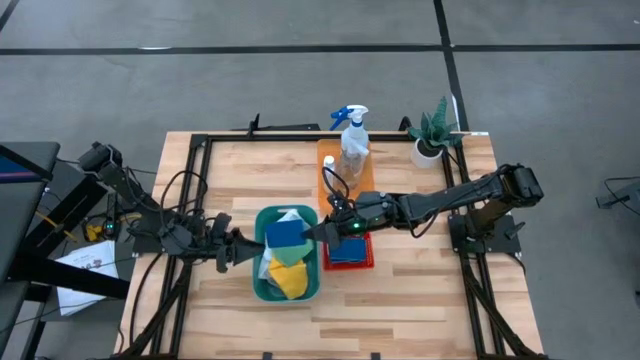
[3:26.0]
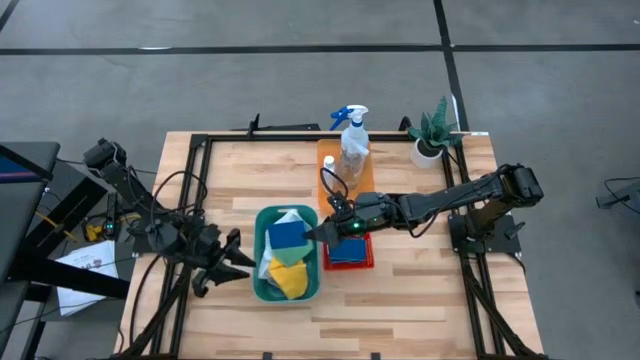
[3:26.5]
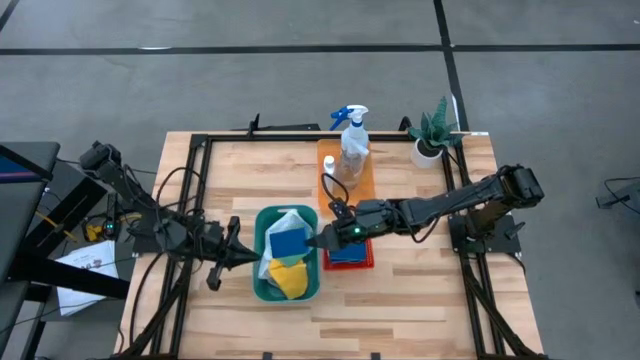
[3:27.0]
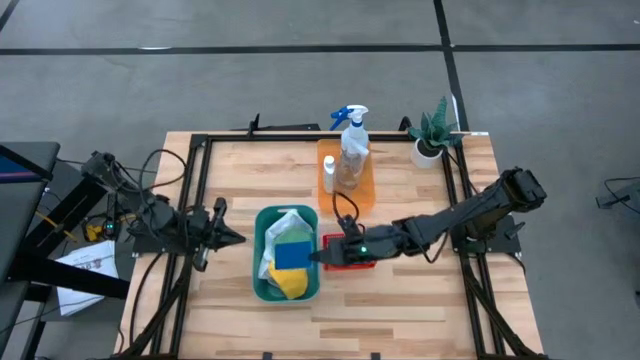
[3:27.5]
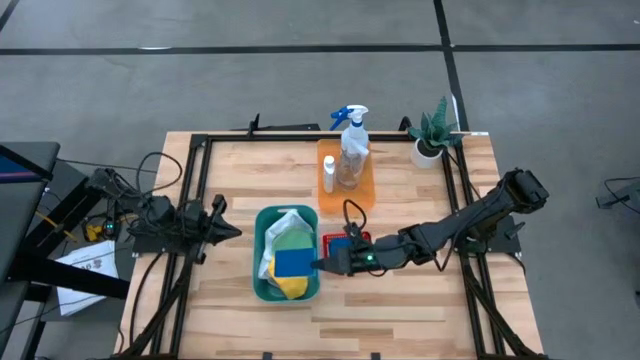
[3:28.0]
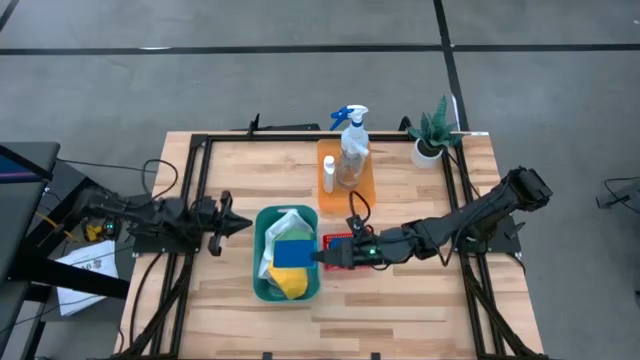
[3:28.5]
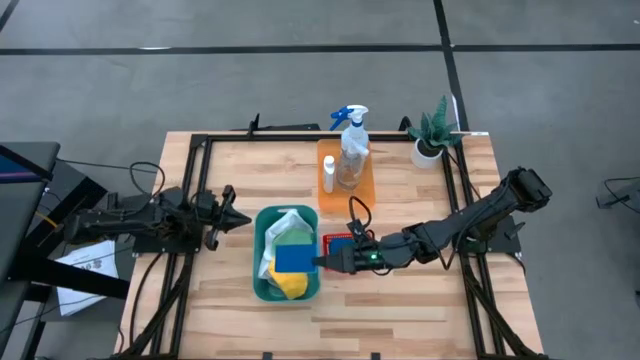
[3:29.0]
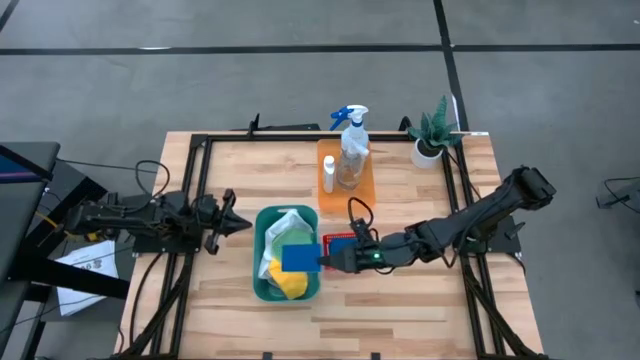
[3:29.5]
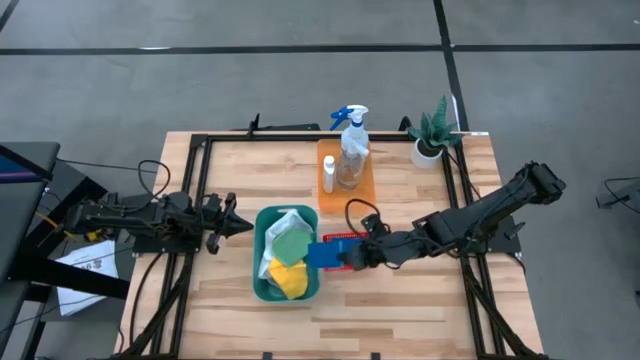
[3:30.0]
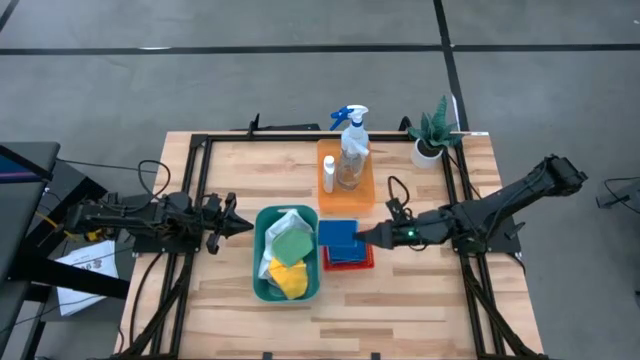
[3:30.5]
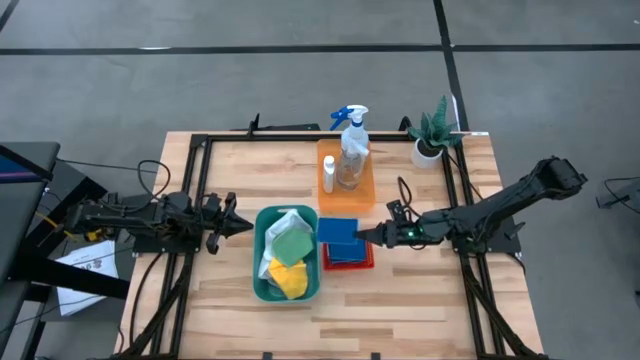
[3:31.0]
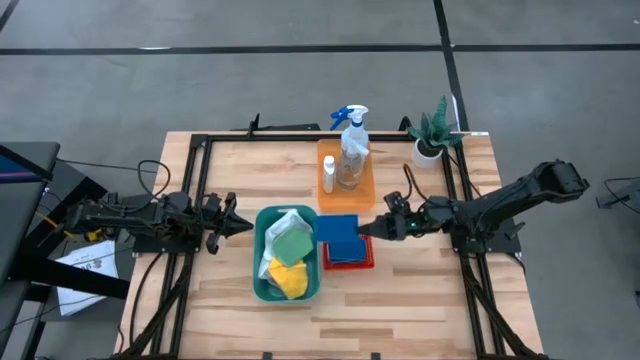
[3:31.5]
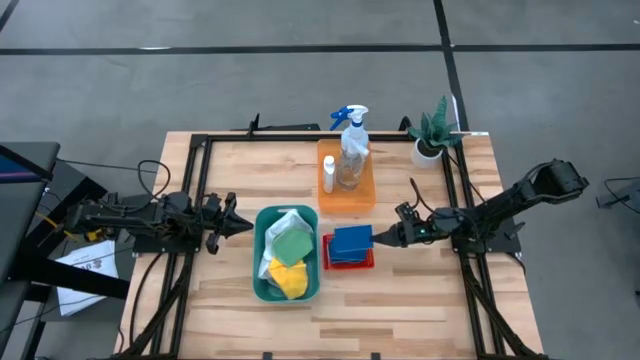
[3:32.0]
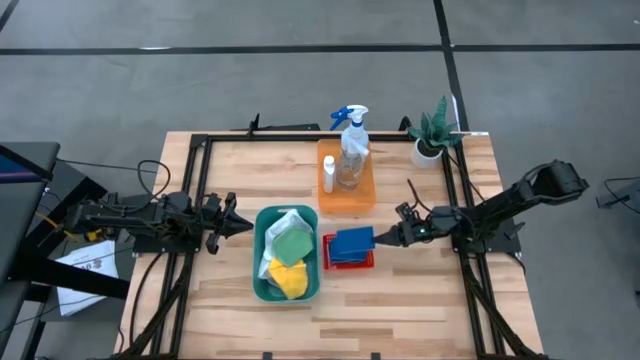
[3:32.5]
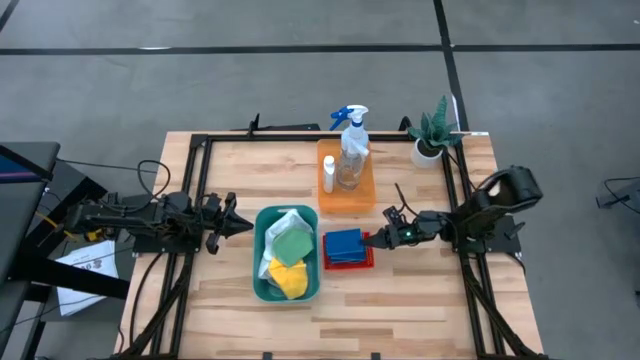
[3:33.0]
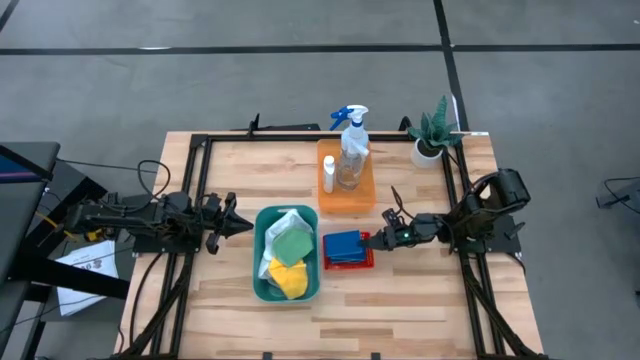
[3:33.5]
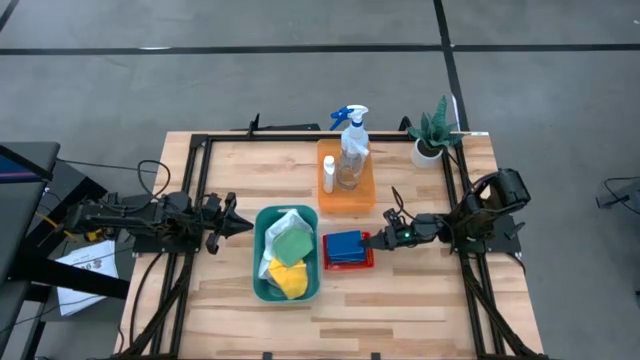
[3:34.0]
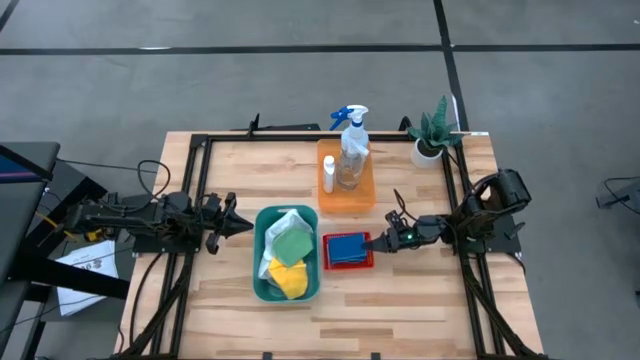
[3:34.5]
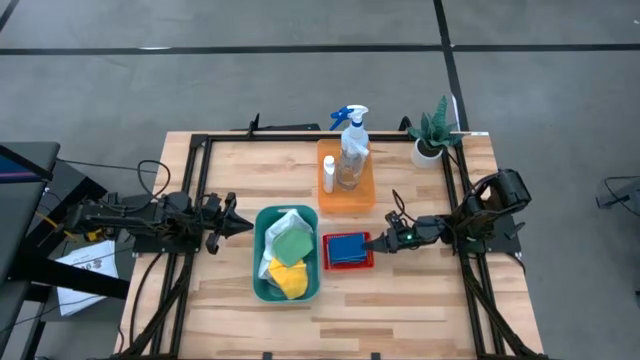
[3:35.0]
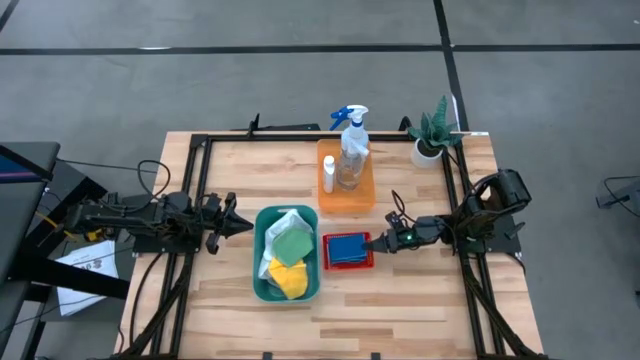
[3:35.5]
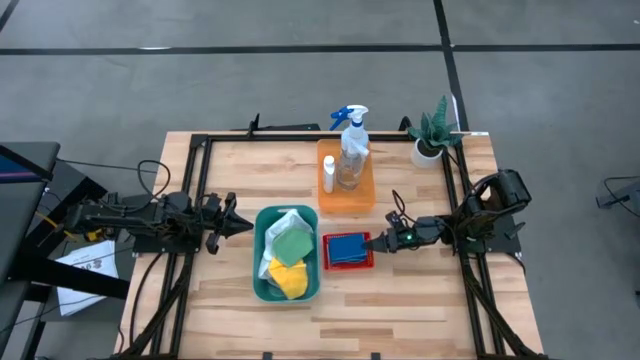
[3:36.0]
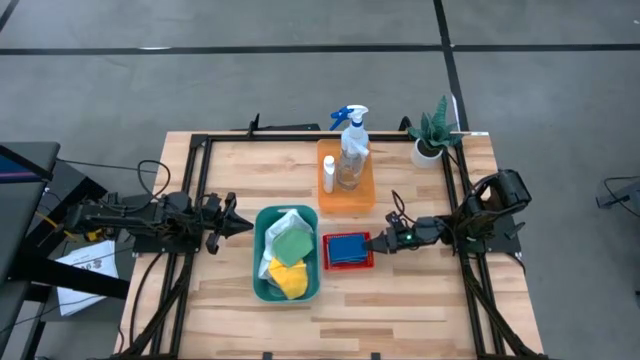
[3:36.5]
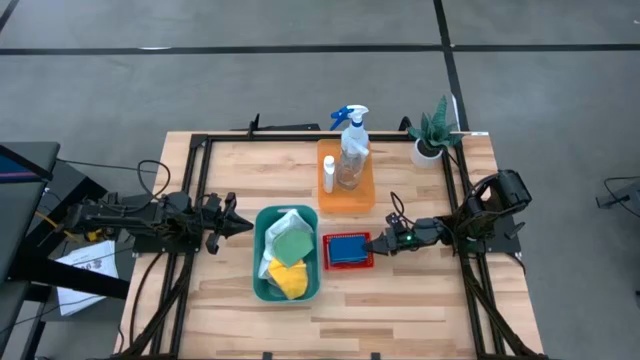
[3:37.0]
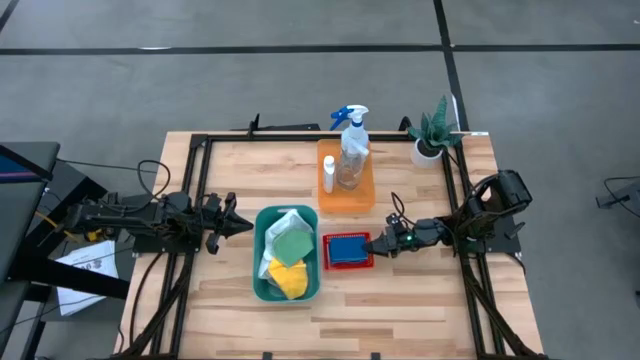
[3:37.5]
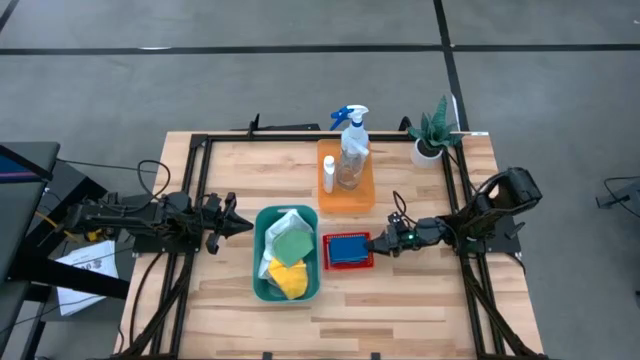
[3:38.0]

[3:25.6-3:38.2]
Task: Pick & Place Kitchen Items
Put the blue sponge into the red bin

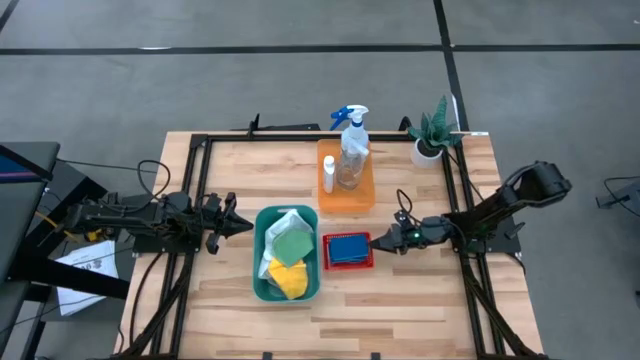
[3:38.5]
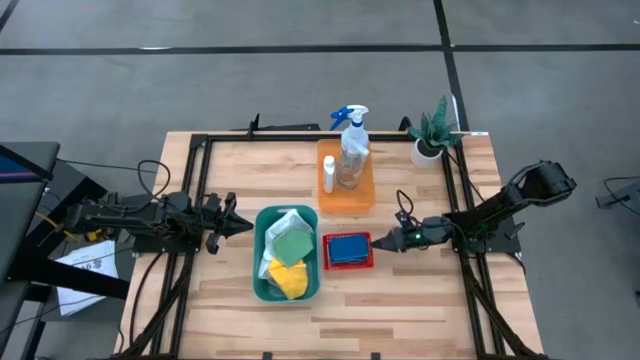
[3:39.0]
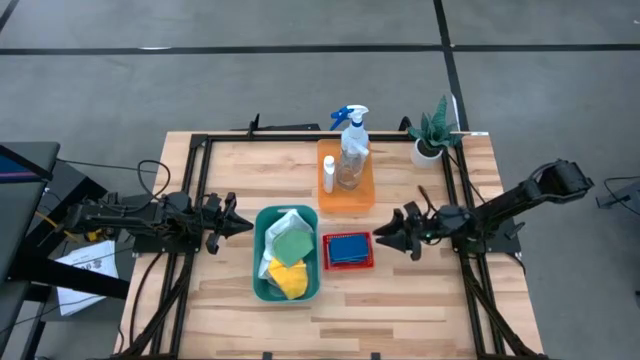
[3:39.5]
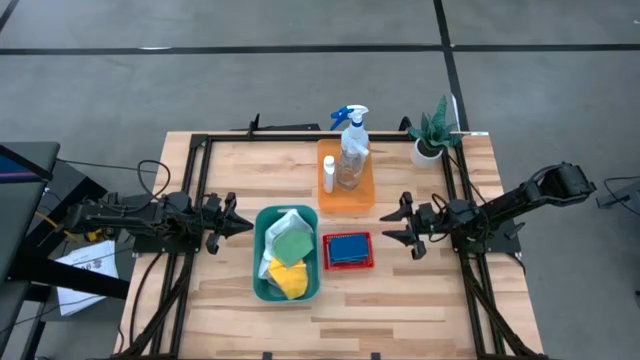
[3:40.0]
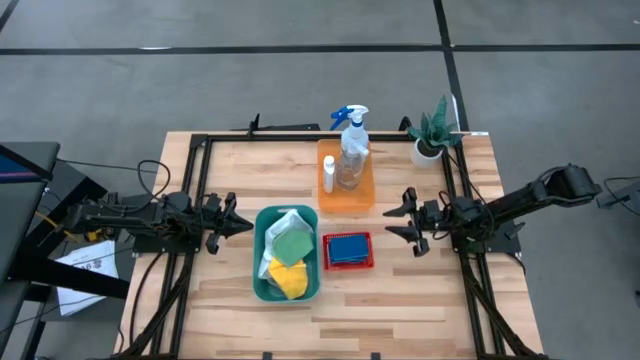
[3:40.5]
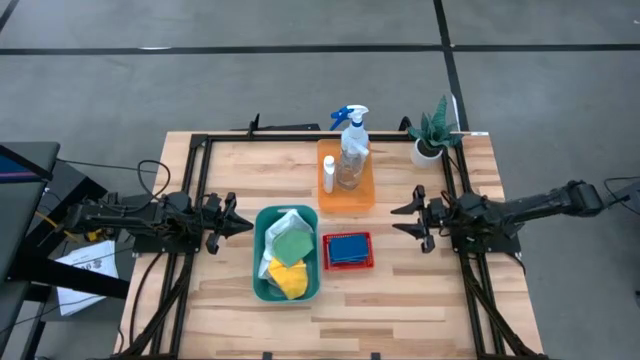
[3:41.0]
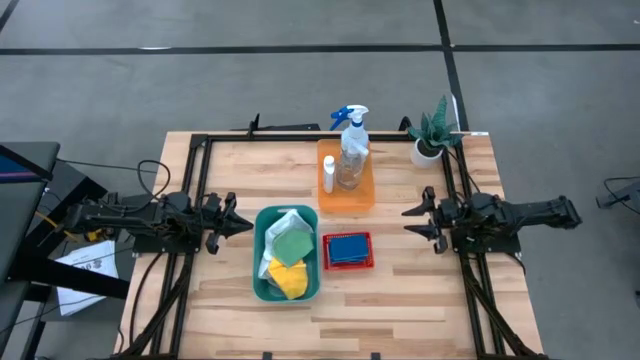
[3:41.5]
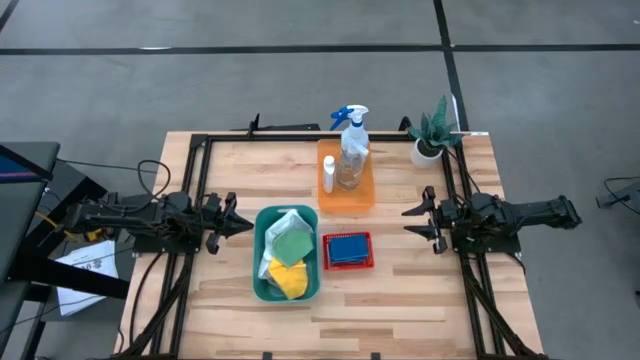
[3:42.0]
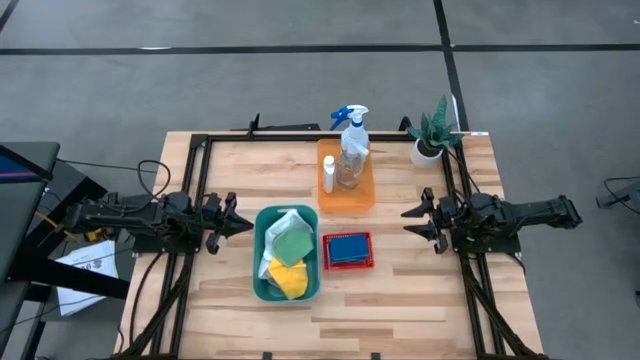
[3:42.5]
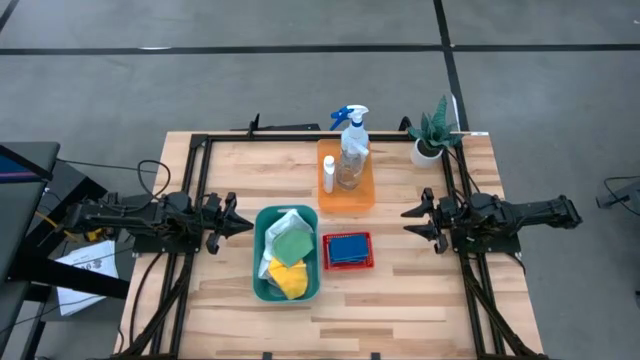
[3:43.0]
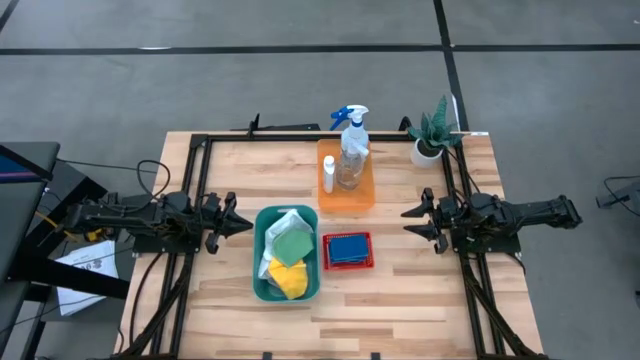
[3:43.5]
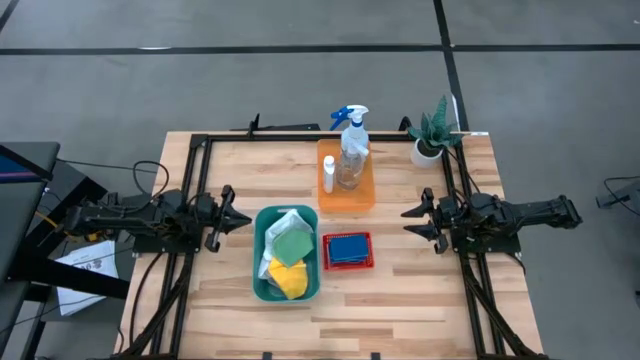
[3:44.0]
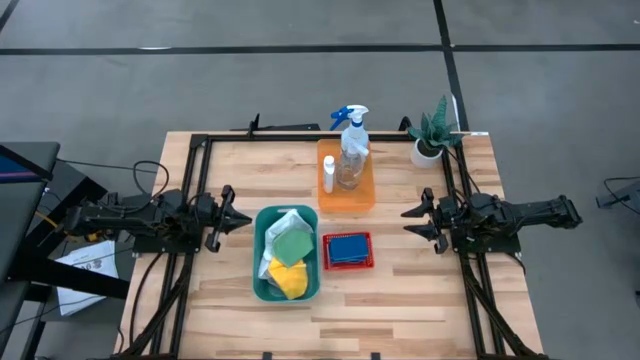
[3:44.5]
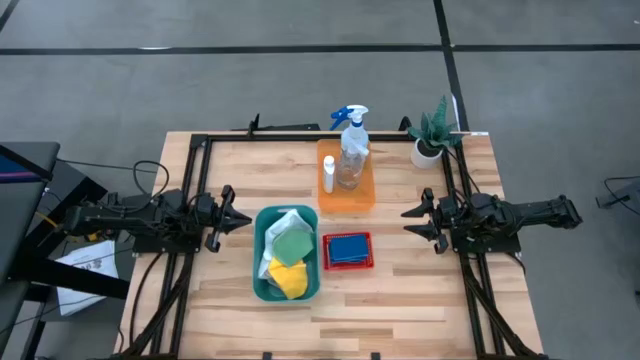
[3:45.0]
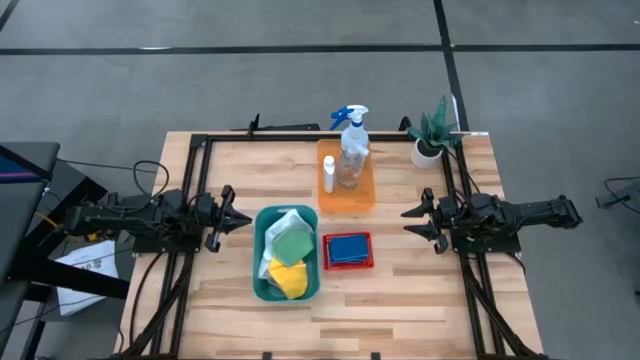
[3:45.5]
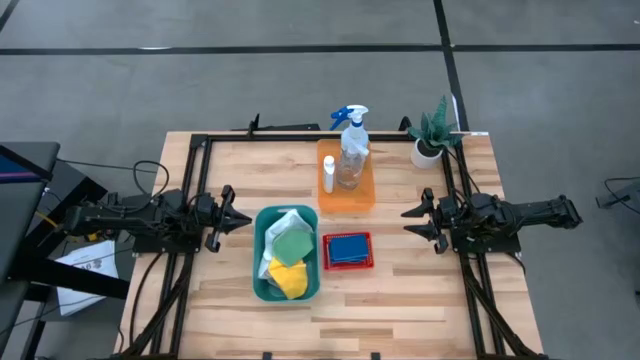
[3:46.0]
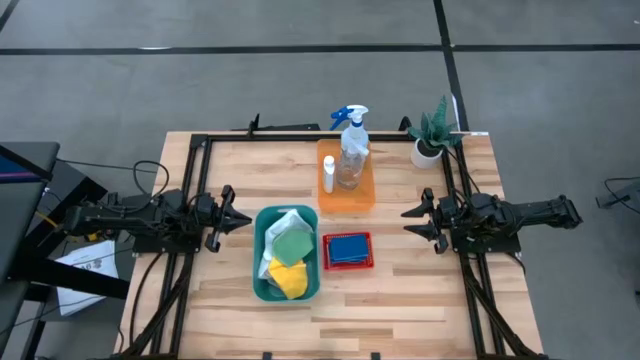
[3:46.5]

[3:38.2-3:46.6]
Return to home position
